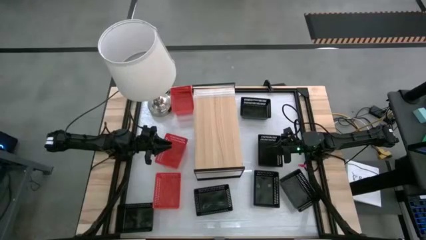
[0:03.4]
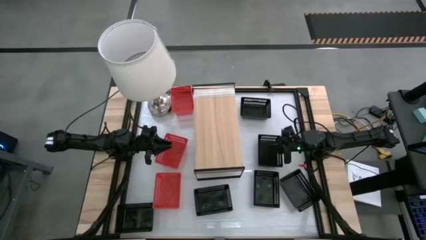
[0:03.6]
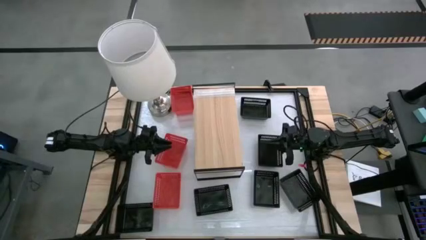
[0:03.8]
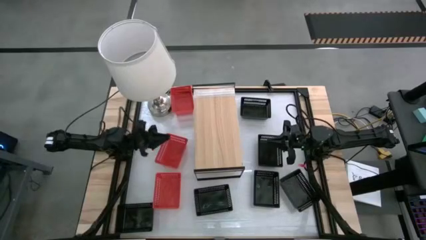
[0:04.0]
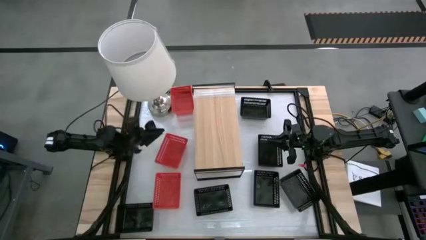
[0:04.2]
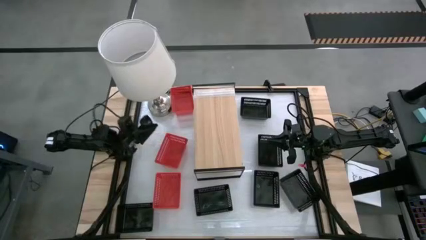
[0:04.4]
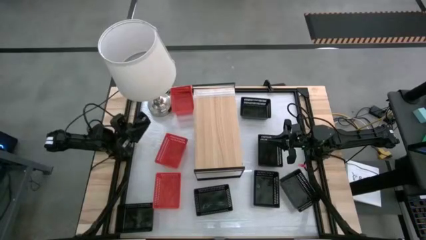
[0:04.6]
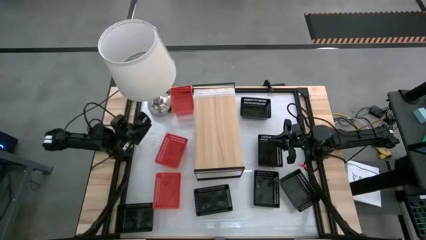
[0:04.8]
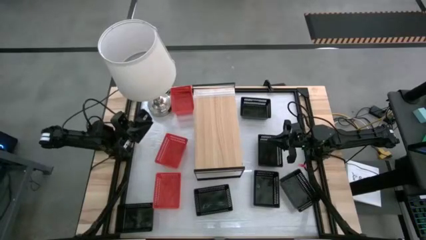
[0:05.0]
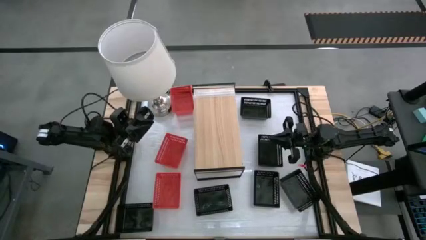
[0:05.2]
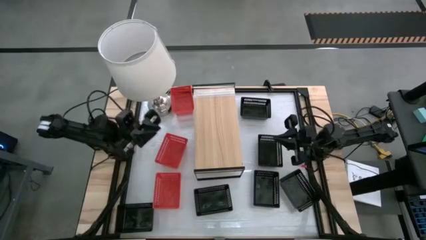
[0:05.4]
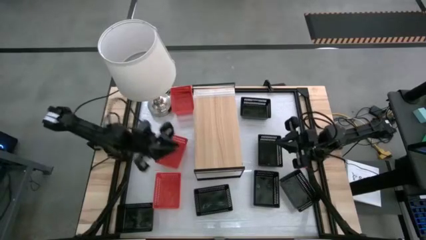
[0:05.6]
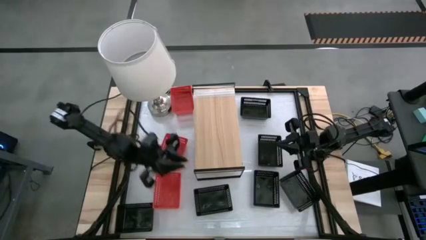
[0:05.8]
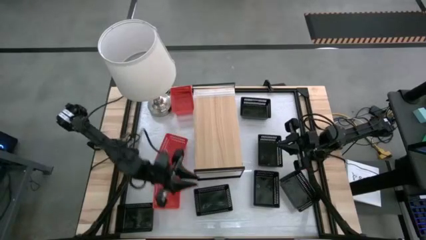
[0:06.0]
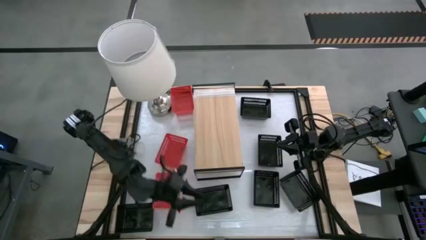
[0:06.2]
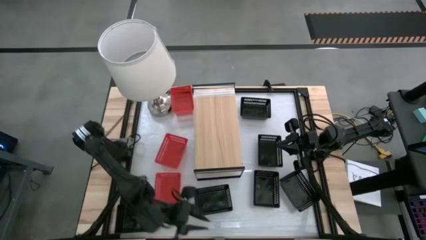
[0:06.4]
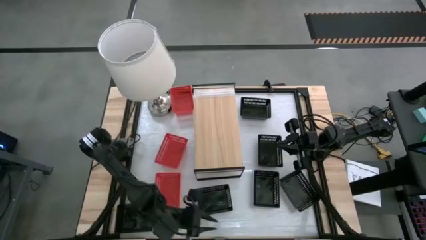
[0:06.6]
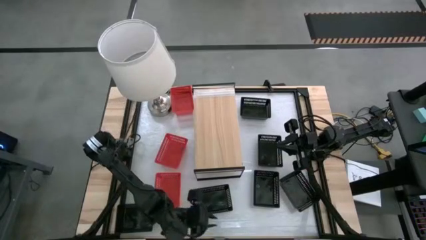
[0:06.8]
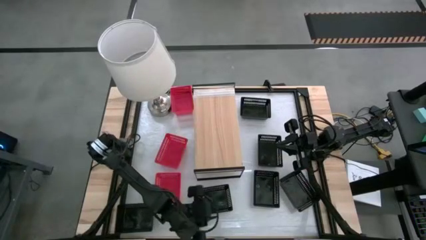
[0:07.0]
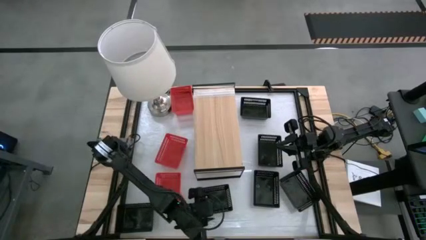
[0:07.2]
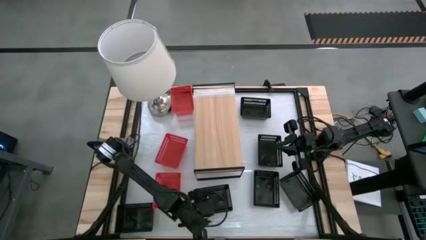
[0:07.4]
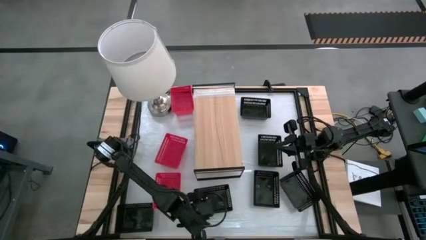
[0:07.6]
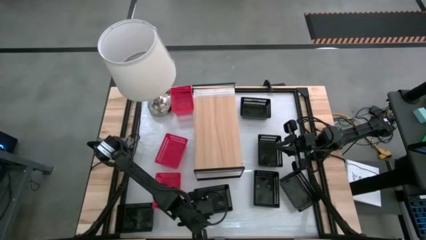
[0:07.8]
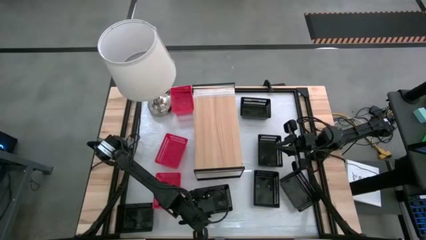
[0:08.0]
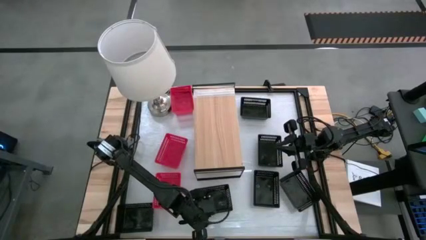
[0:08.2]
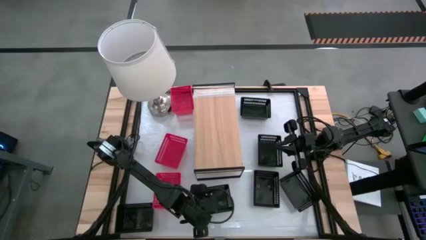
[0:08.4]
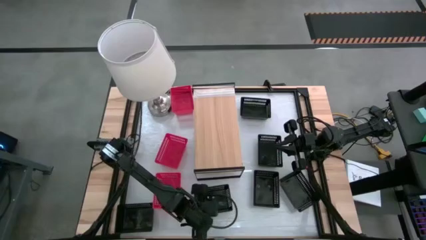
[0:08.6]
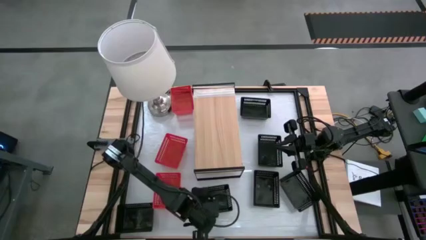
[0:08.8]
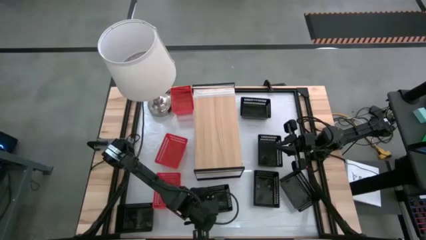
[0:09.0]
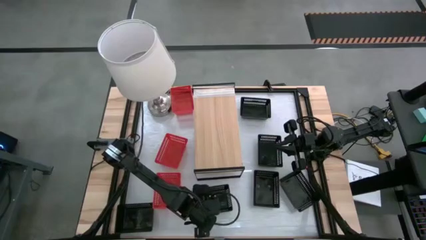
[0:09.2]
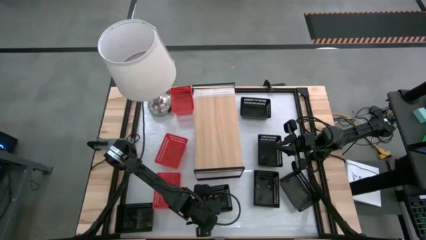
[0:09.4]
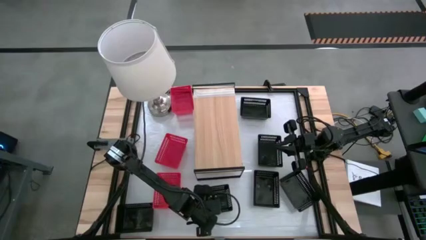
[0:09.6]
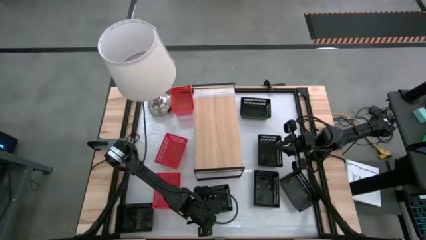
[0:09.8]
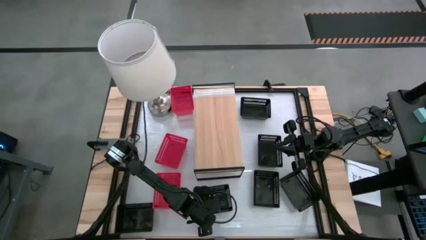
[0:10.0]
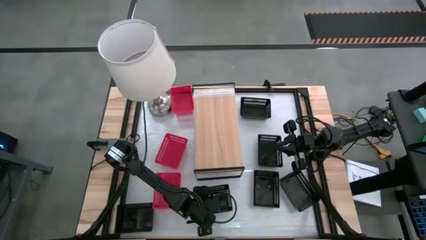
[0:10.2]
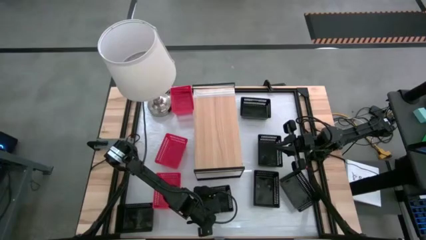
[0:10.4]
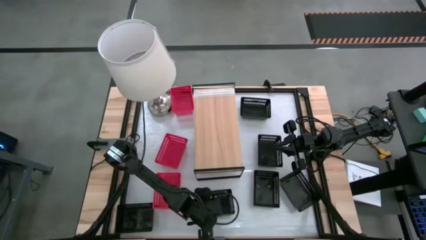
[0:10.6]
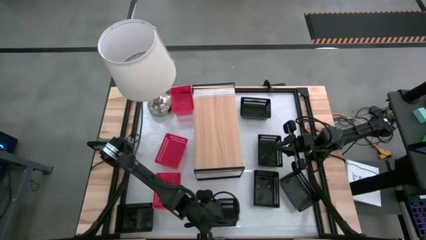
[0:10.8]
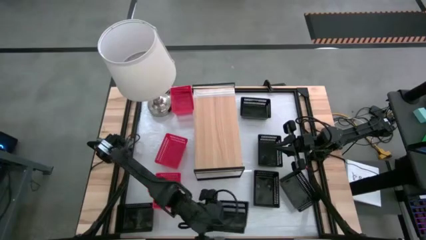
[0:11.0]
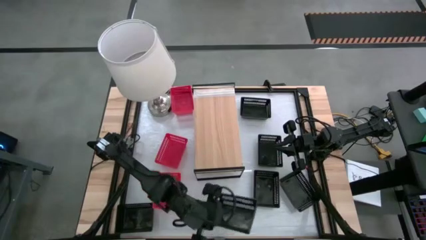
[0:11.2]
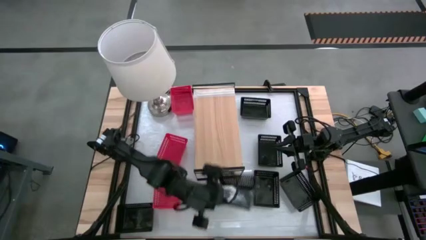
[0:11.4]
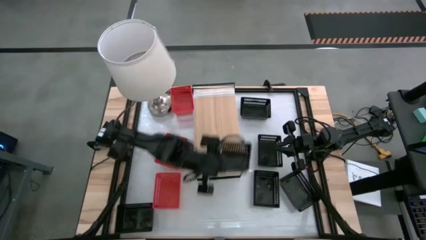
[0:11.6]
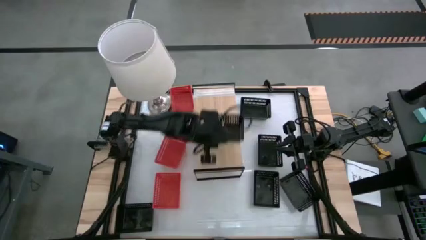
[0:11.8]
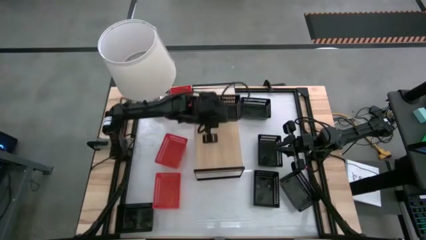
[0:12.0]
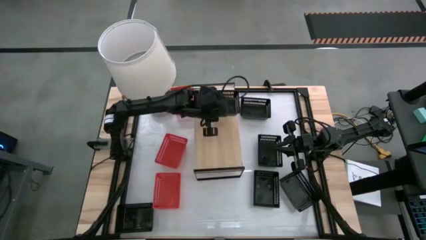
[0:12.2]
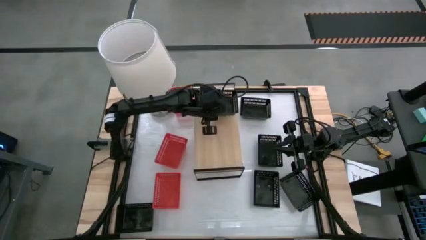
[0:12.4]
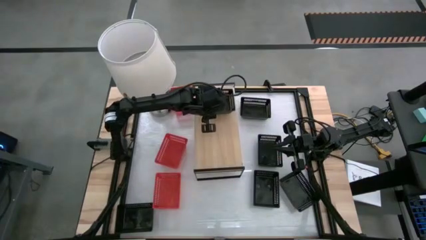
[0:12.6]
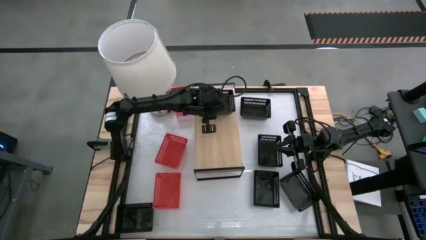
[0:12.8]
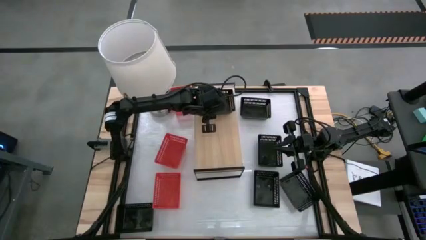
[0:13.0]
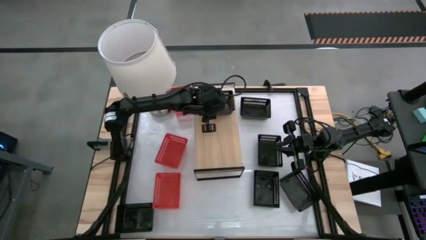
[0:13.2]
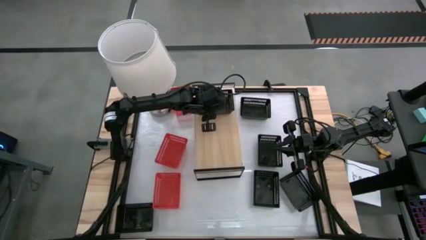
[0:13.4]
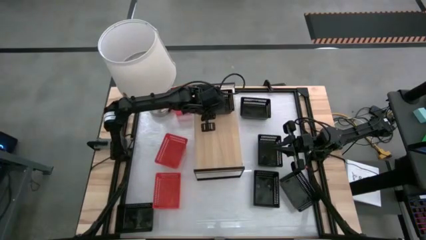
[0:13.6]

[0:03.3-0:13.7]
Task: Stack baskets on shelf by color
Put the black bin on the shelf

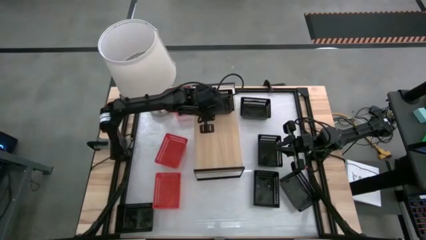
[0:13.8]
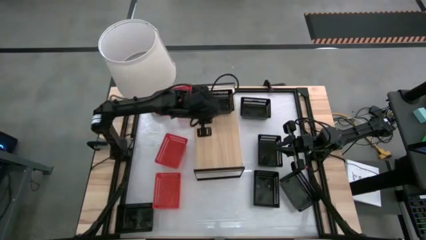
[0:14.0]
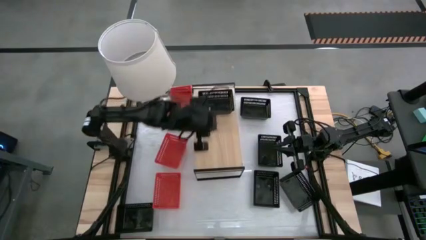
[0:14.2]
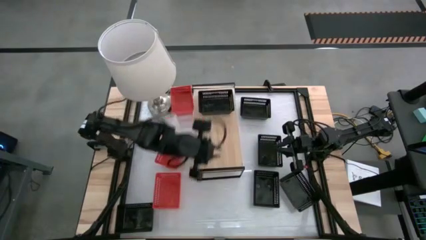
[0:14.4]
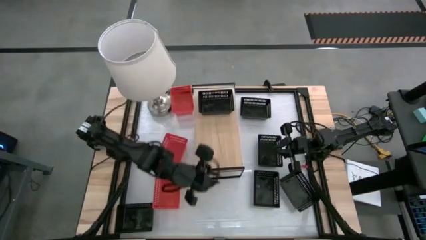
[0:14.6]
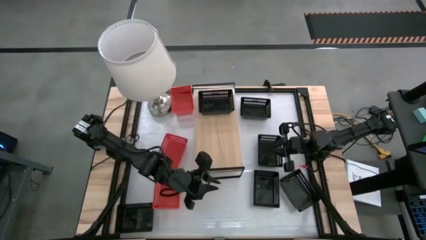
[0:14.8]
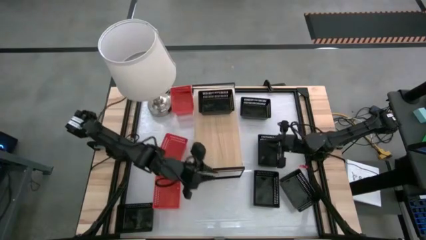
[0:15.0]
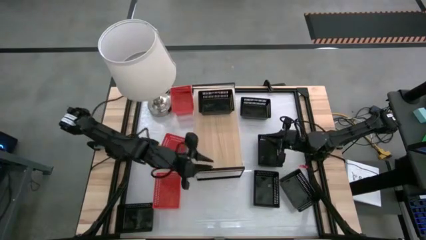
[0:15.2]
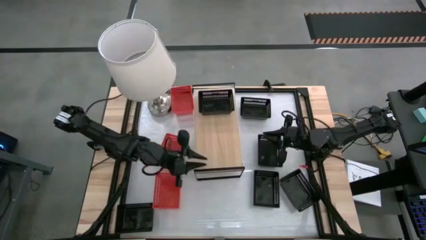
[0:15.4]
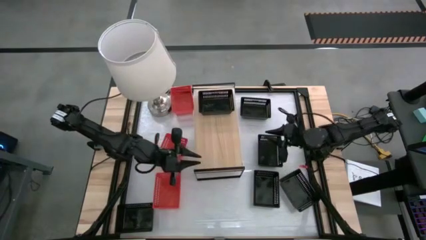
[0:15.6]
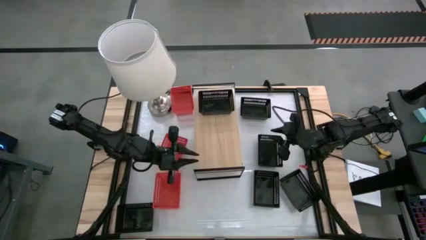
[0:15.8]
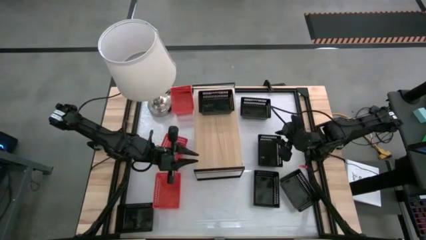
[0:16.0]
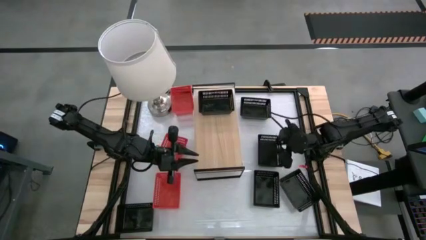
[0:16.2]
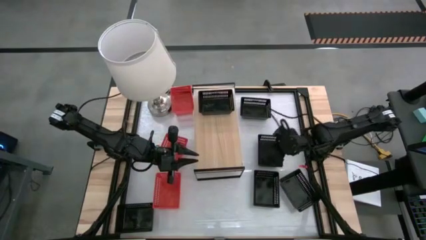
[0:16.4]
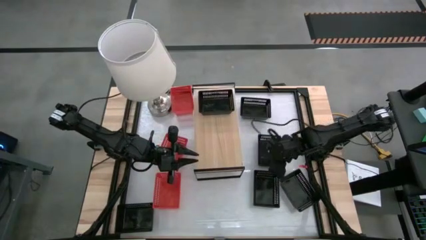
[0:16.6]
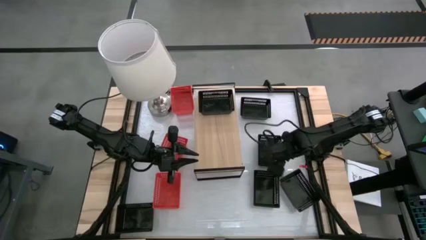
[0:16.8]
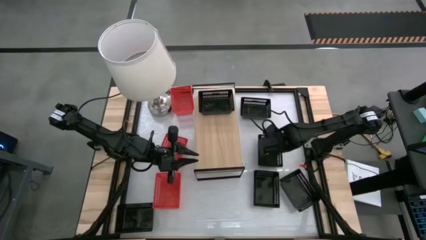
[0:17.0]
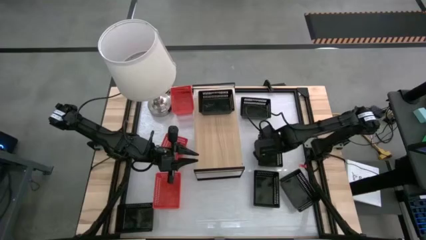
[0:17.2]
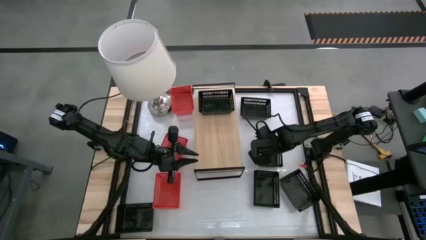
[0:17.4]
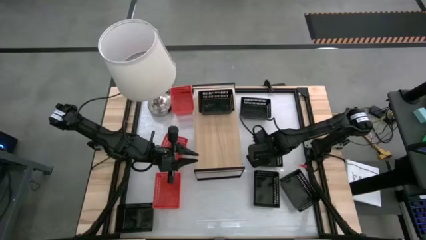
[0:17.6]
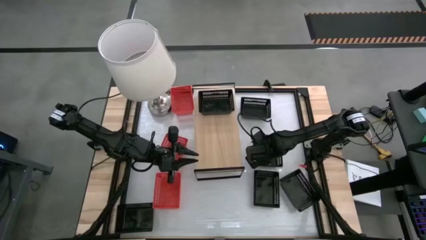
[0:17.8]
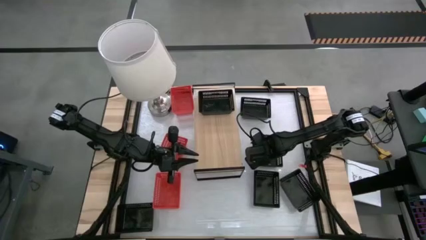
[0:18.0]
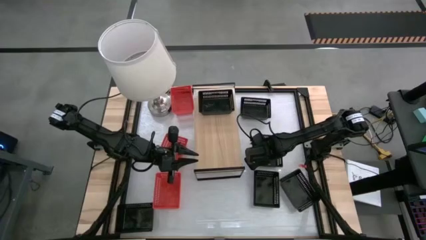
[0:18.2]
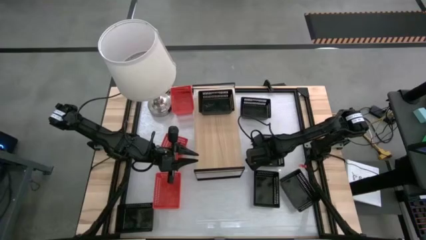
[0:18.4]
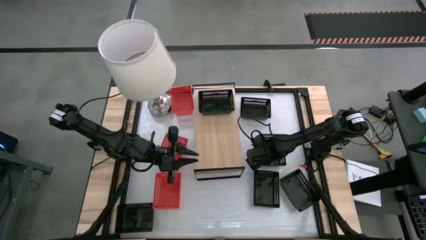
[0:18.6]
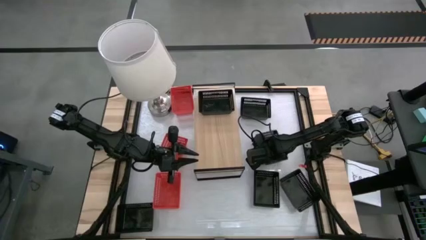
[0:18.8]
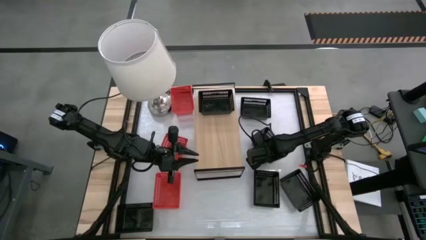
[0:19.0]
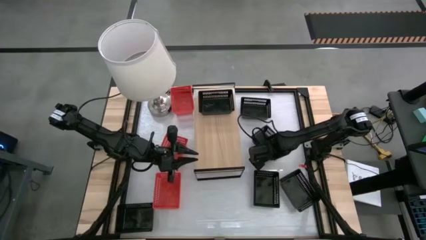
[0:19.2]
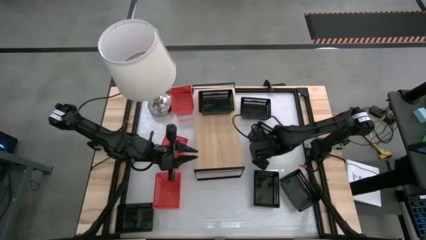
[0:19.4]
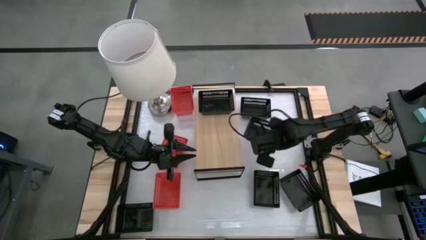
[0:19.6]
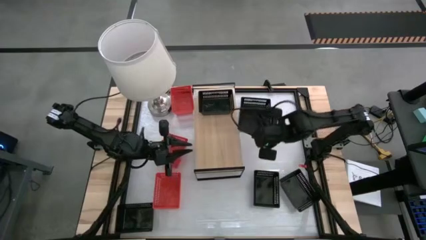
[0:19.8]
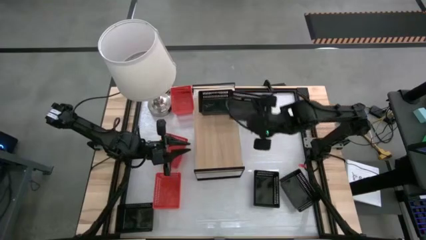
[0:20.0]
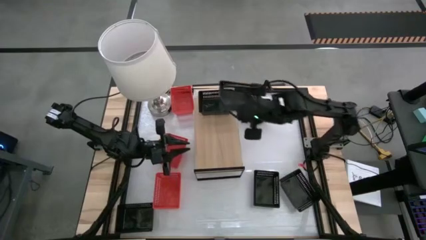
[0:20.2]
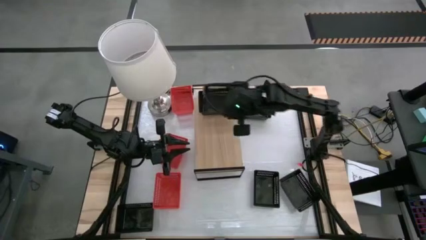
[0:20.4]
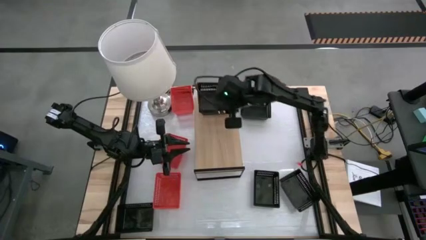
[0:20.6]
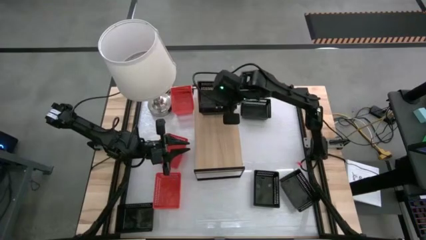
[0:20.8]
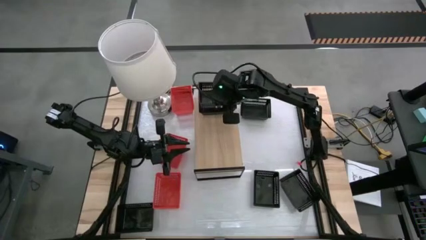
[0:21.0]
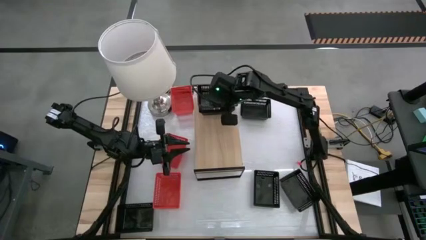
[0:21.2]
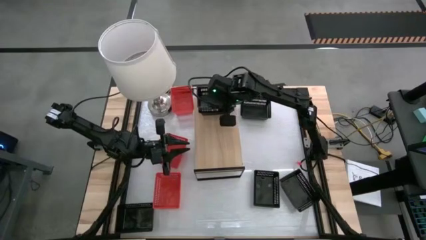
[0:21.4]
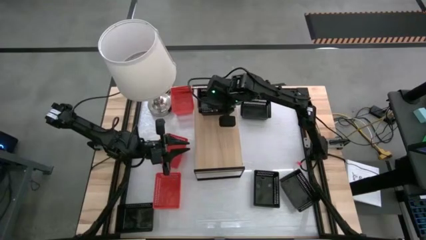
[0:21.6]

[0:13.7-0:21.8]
Stack the black bin on the black bin on the shelf
